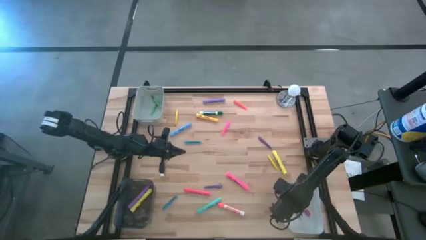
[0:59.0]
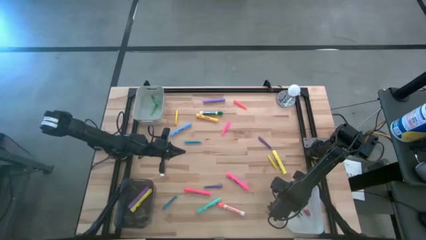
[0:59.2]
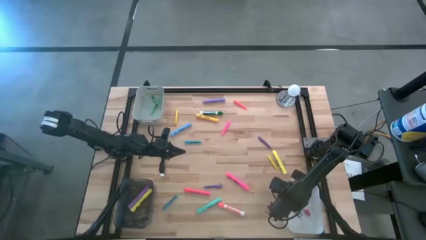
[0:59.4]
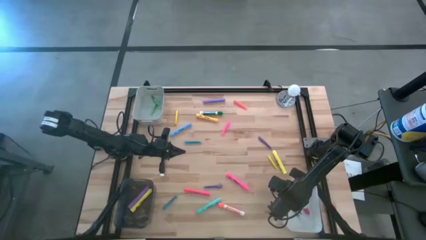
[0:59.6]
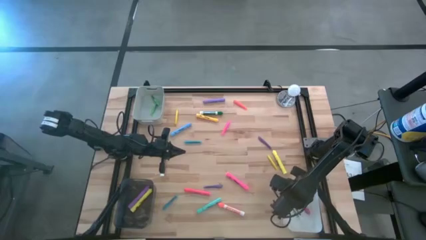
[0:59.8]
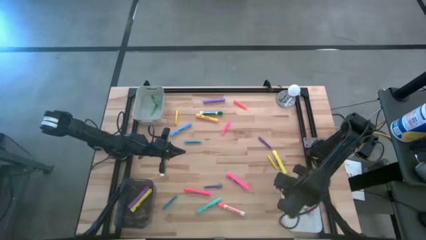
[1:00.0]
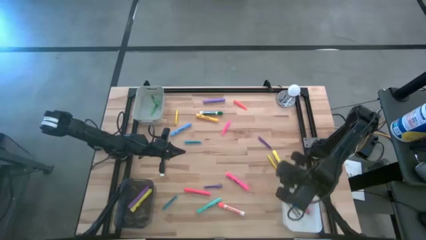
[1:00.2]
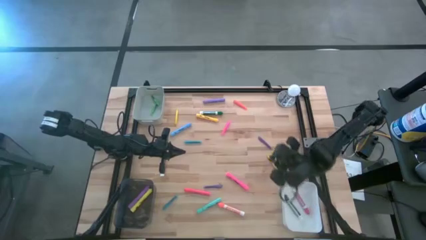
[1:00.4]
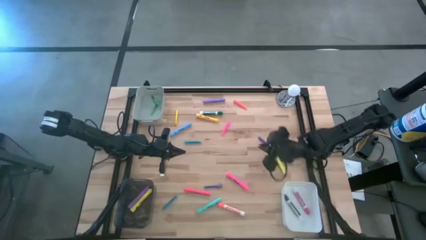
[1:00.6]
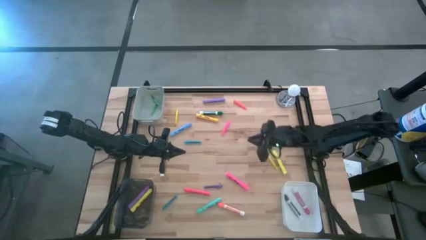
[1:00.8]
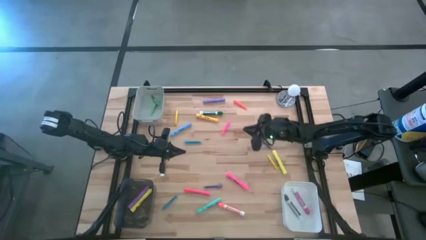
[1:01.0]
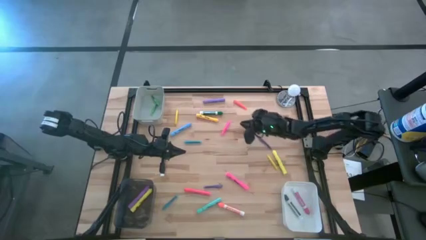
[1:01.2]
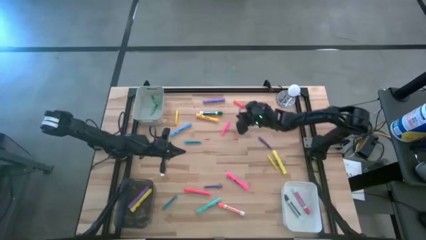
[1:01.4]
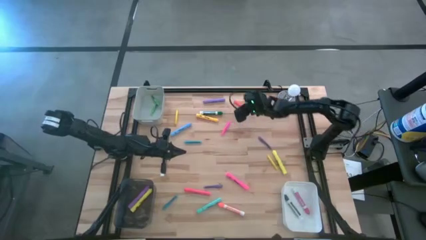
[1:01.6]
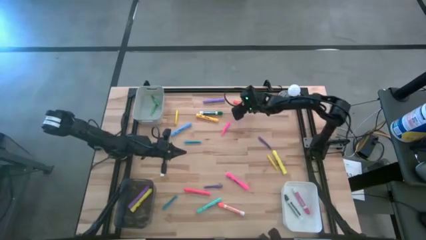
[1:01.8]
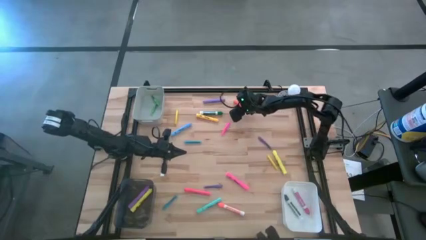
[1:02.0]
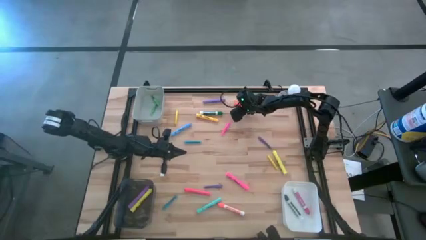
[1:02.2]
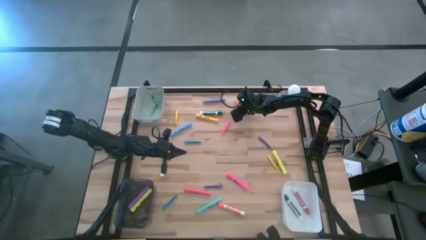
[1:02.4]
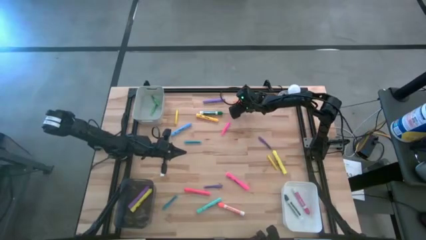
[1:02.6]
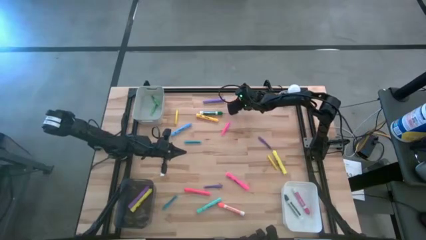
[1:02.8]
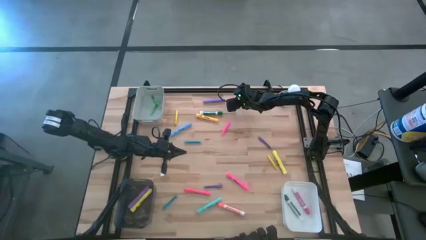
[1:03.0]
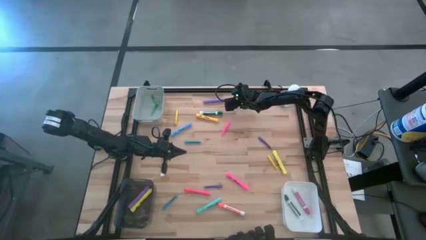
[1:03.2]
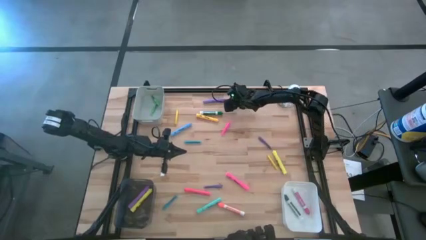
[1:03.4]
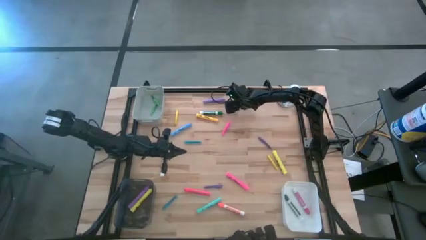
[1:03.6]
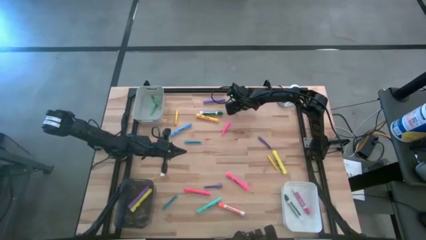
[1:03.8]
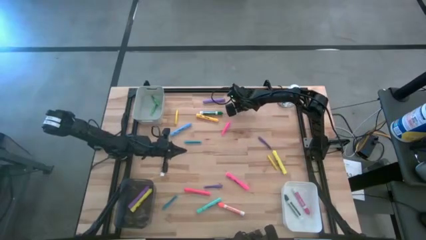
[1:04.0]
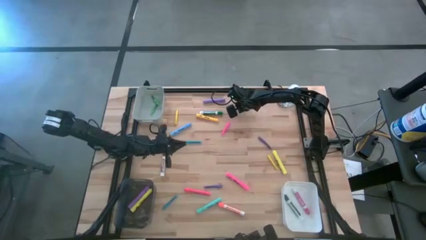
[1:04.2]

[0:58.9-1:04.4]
Task: Pick & Place Markers
Put the orange pen into the gray bin

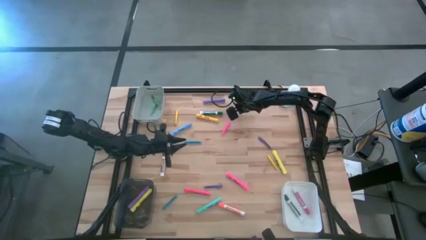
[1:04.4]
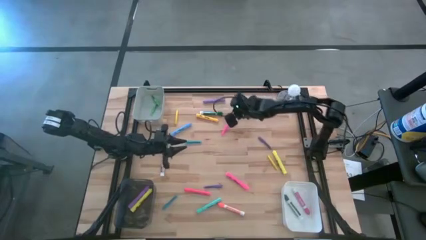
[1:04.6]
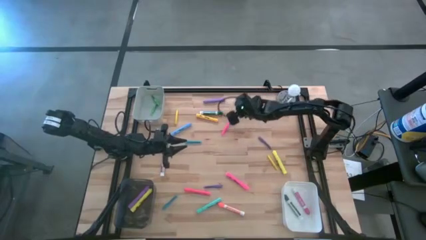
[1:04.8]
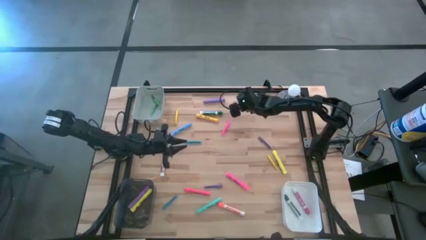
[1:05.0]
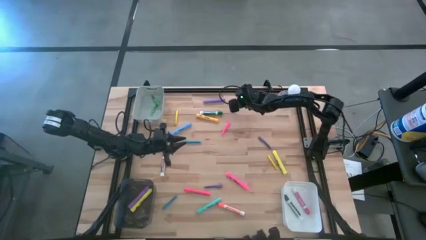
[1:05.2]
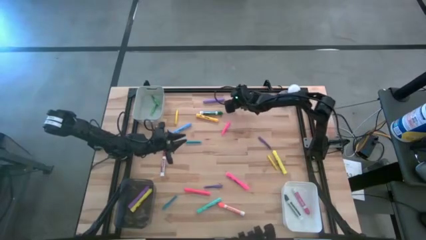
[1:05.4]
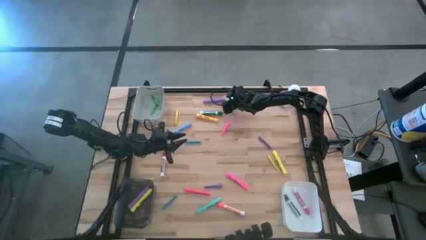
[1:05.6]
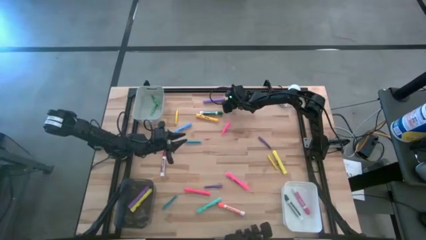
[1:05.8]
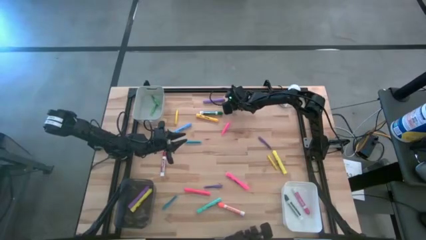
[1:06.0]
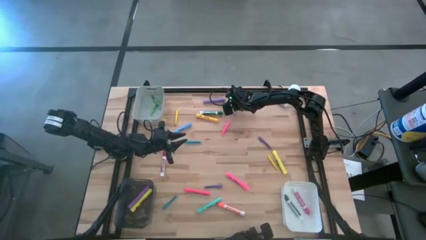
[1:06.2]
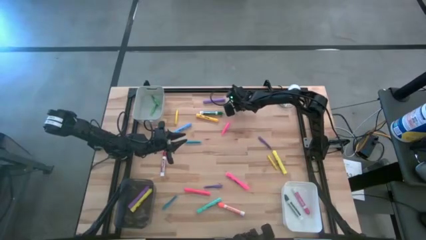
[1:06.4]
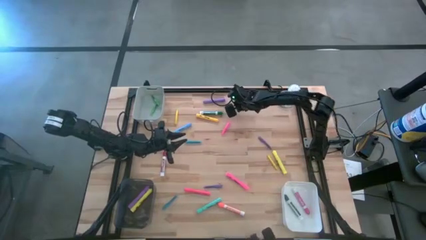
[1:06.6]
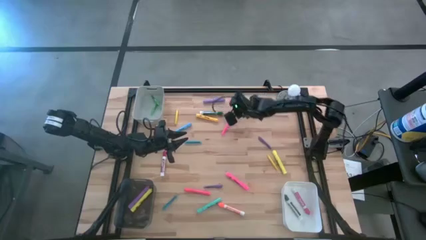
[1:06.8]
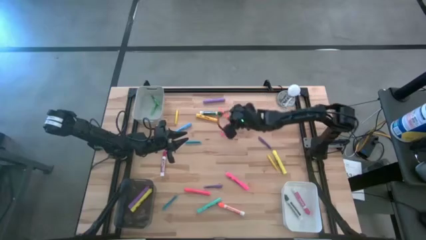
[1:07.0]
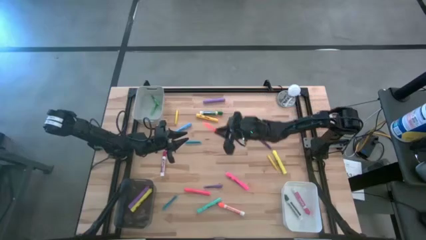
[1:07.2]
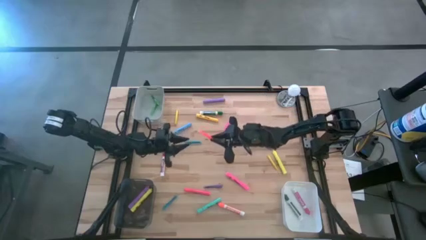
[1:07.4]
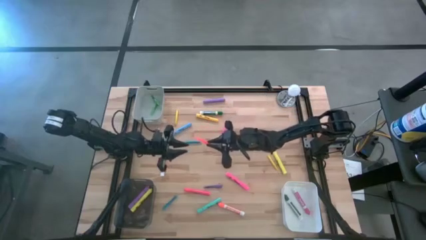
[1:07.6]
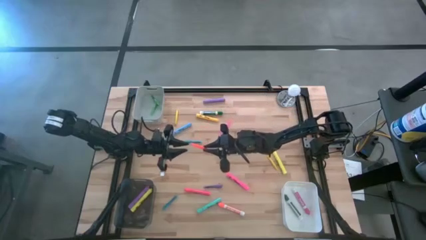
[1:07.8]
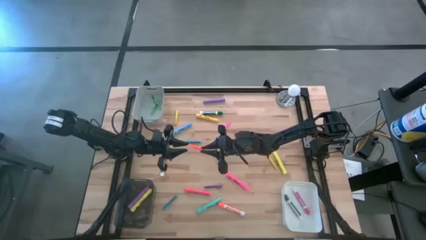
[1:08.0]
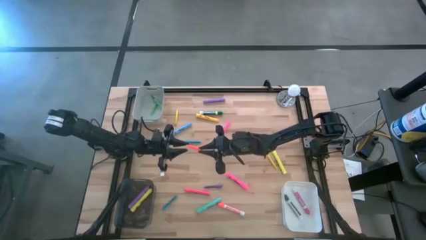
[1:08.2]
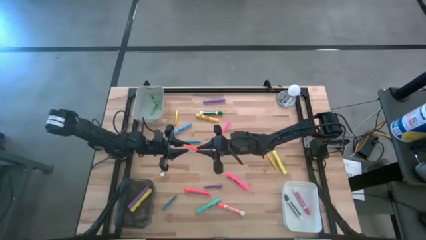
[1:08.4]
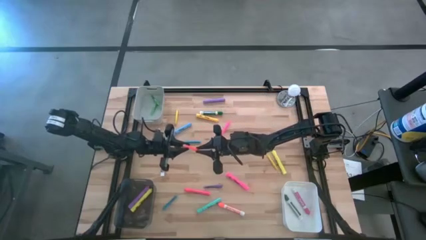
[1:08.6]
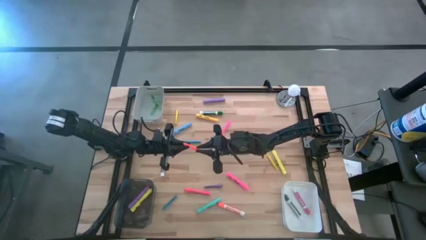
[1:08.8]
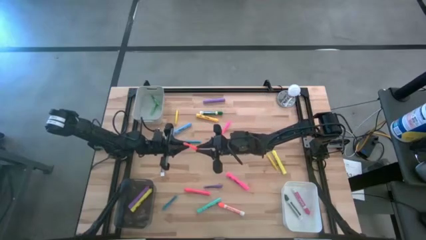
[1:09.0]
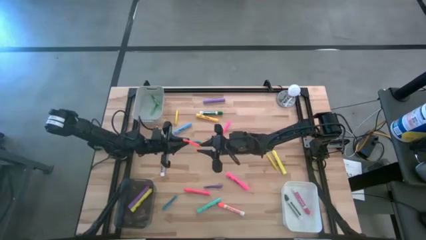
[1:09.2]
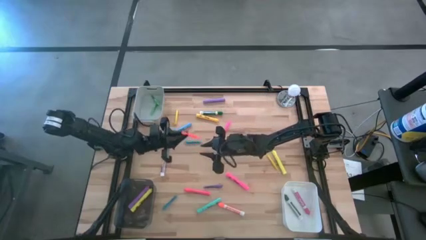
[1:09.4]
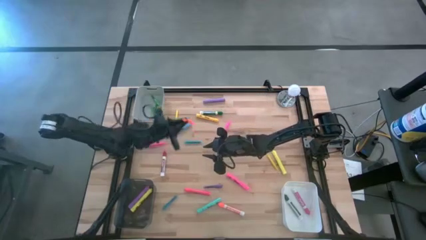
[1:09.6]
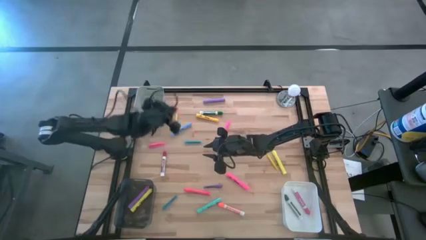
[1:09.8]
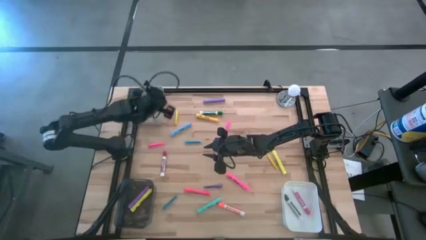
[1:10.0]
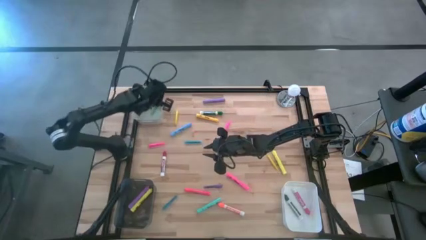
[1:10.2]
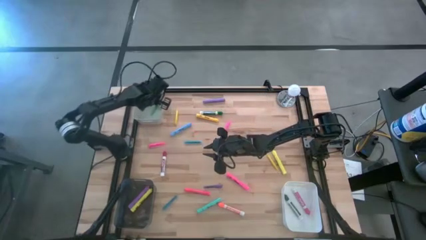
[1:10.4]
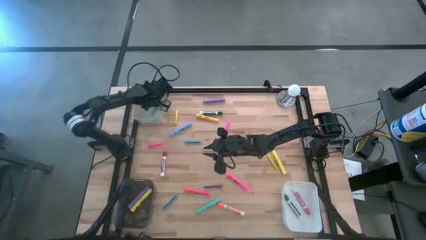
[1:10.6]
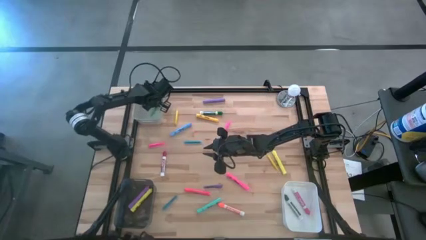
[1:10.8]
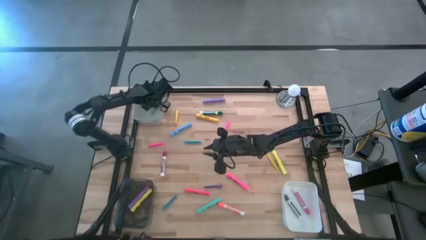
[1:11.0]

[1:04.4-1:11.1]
Put the orange pen into the gray bin

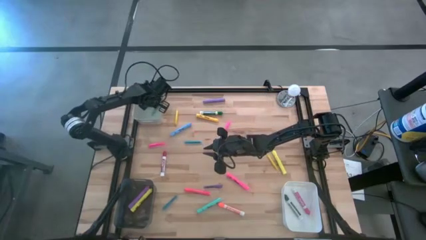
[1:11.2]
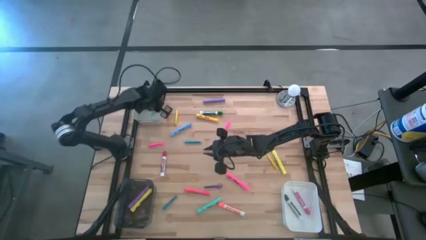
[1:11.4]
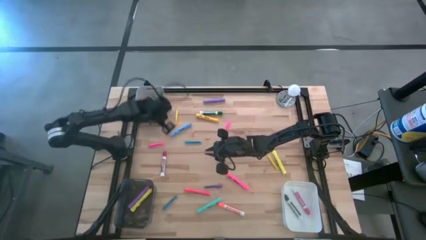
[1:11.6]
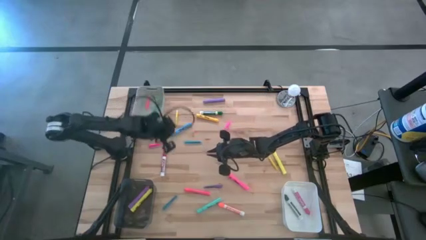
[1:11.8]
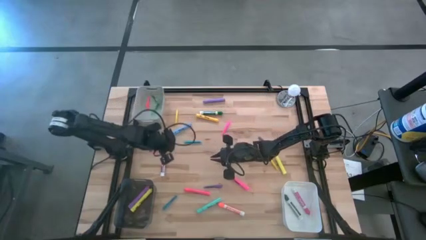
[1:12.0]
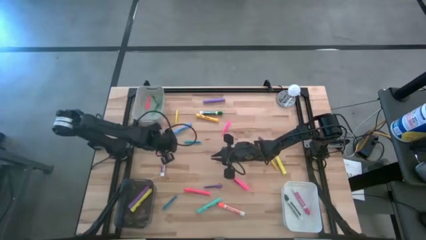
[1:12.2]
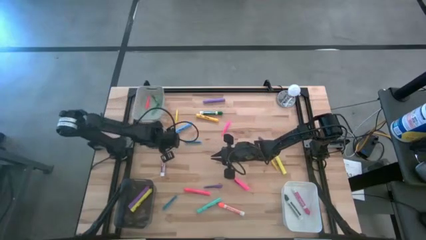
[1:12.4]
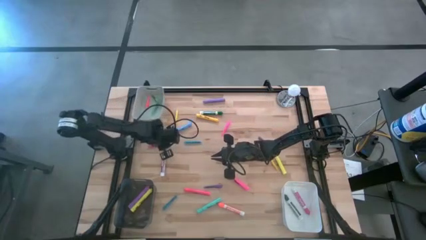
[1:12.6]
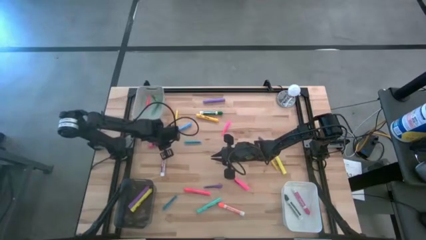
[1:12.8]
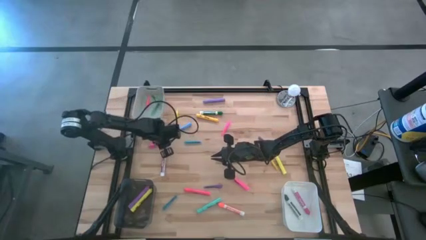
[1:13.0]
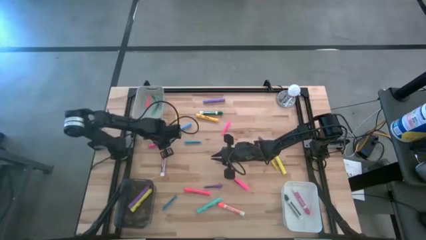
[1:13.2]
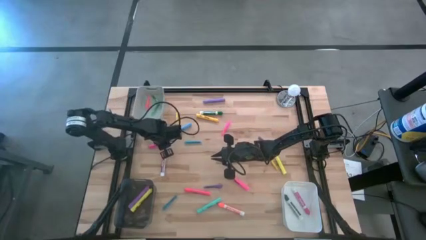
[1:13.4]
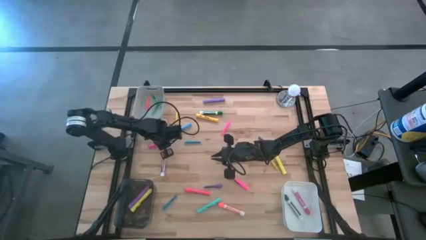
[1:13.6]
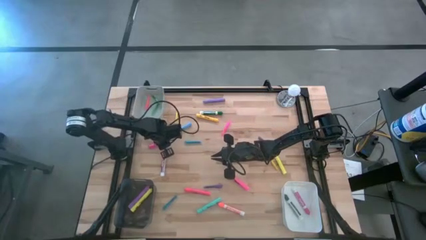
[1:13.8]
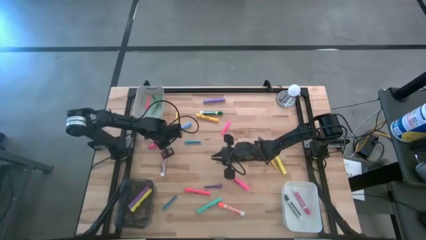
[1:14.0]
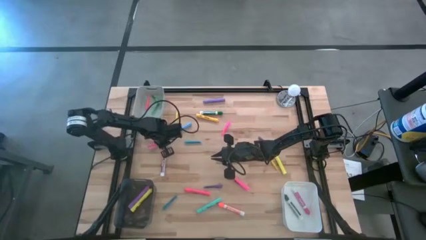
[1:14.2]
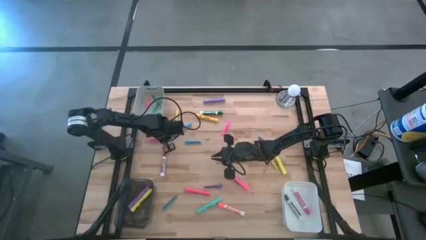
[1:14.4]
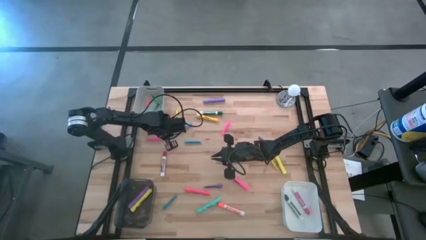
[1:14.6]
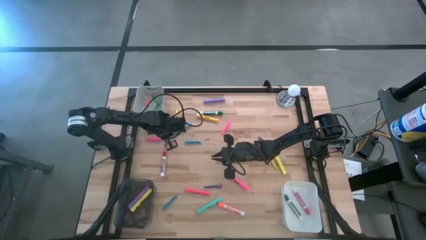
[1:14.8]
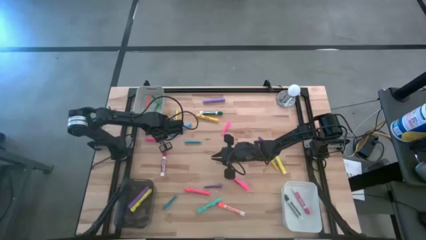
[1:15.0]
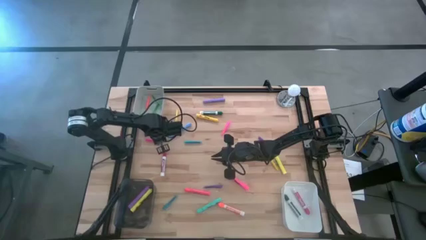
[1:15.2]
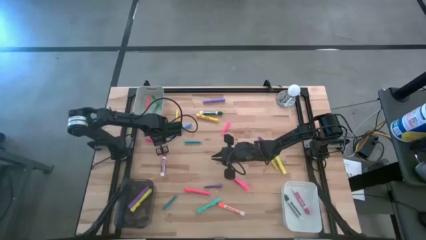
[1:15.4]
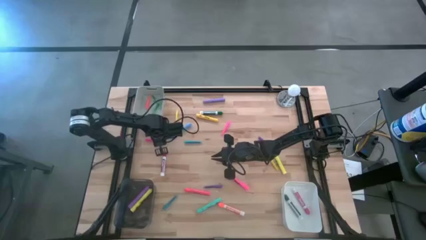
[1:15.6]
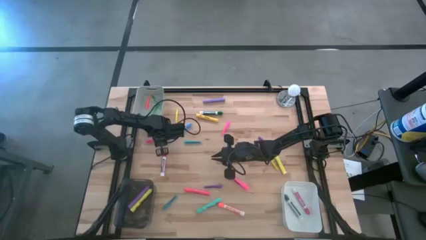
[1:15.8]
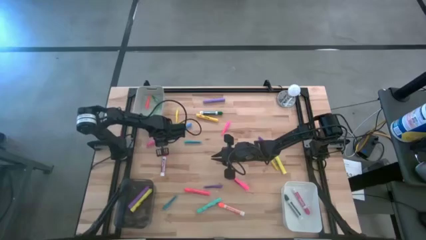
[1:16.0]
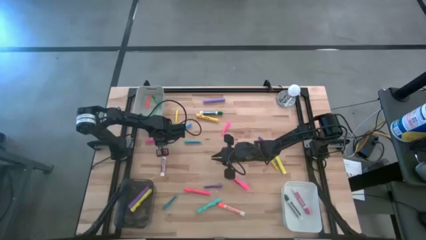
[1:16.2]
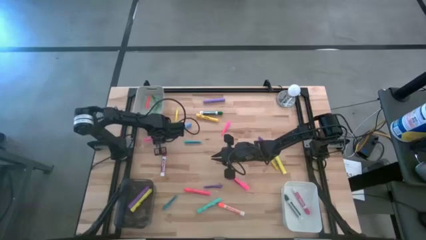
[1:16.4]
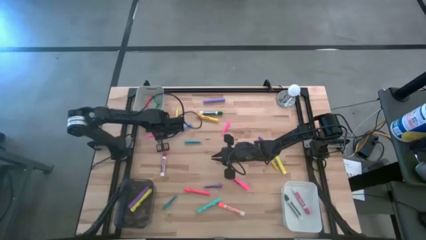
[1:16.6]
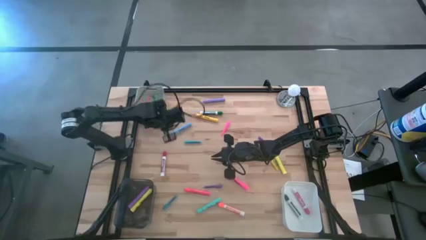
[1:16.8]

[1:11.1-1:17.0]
Put the left pink pen into the gray bin
